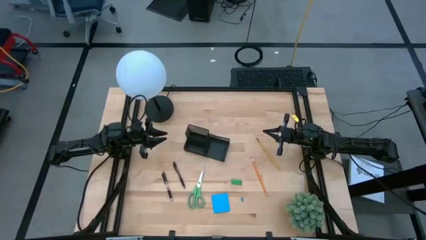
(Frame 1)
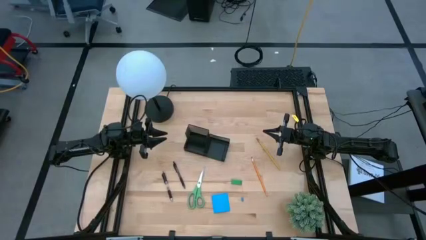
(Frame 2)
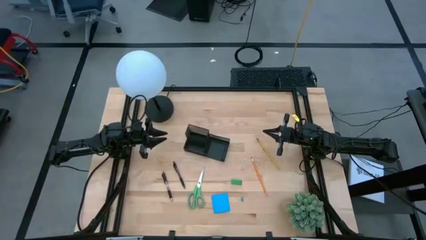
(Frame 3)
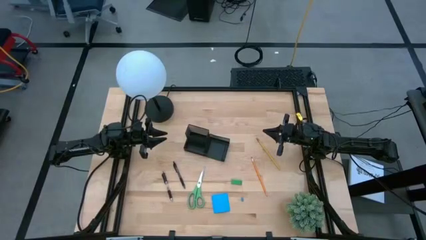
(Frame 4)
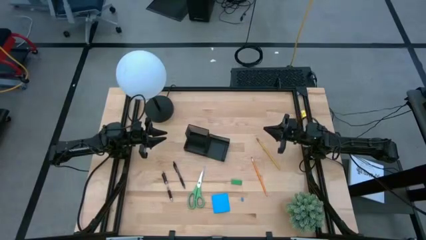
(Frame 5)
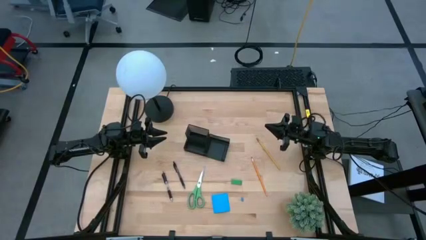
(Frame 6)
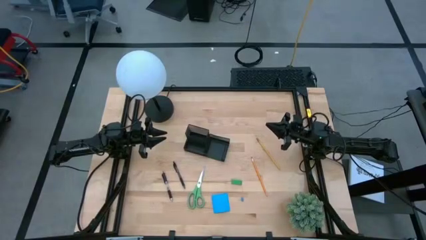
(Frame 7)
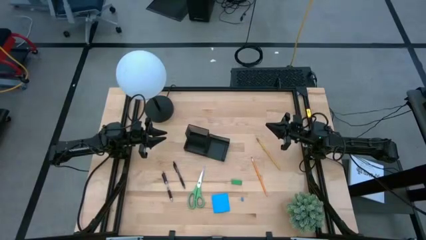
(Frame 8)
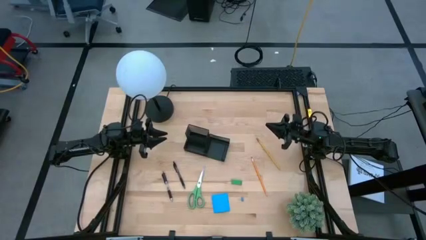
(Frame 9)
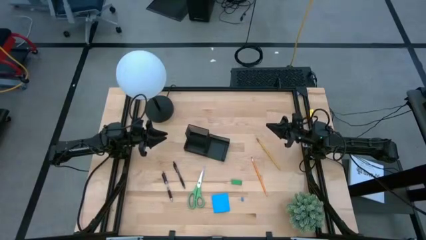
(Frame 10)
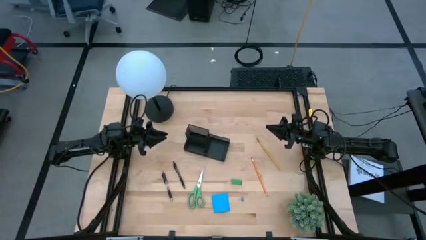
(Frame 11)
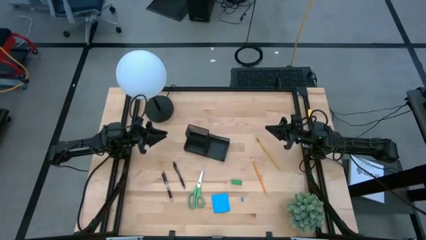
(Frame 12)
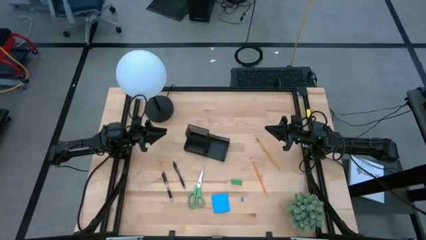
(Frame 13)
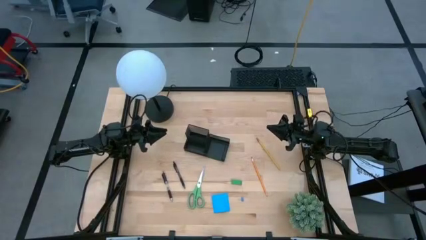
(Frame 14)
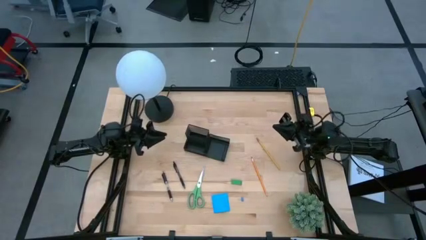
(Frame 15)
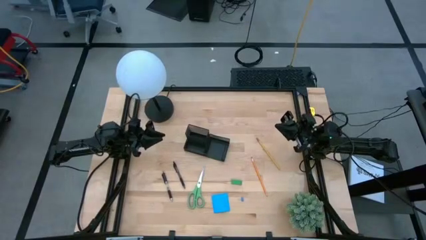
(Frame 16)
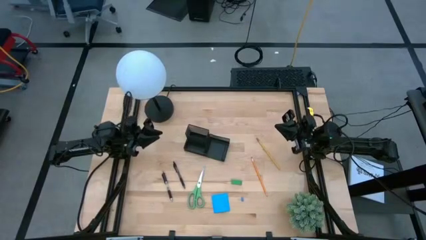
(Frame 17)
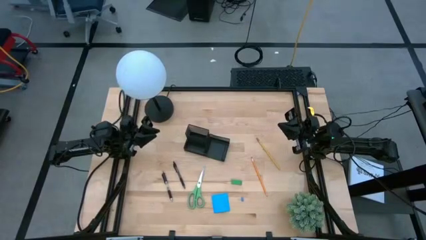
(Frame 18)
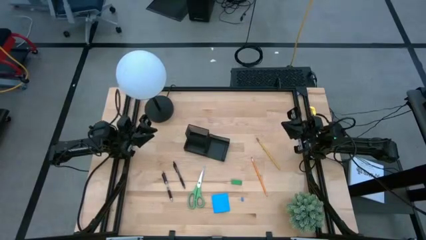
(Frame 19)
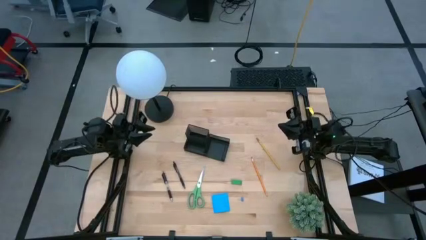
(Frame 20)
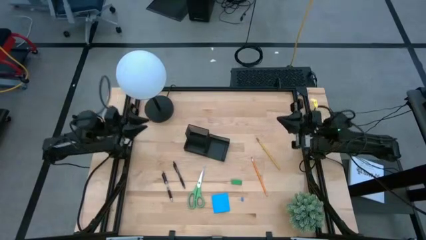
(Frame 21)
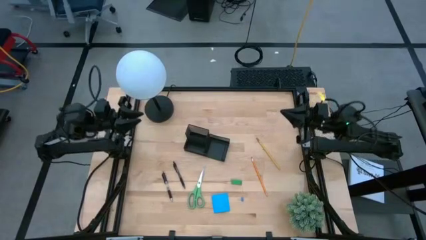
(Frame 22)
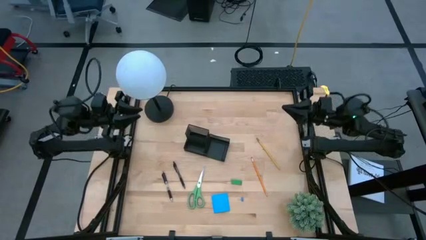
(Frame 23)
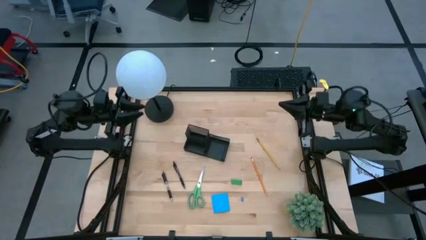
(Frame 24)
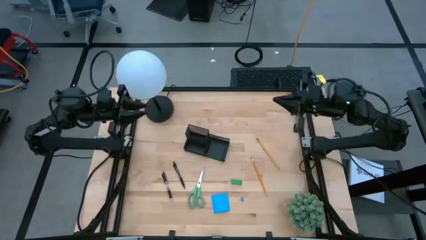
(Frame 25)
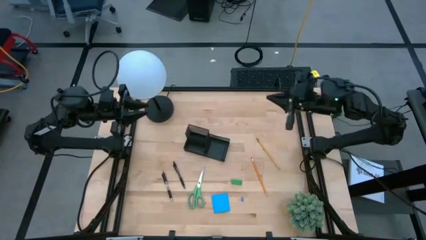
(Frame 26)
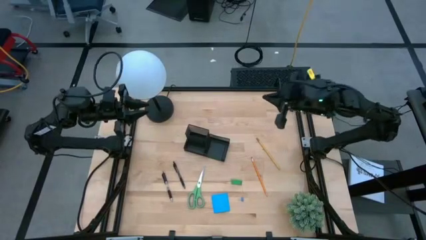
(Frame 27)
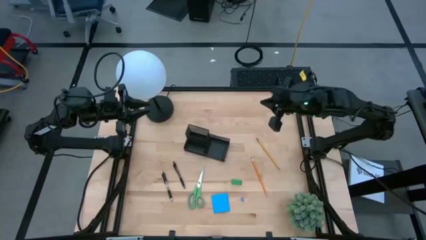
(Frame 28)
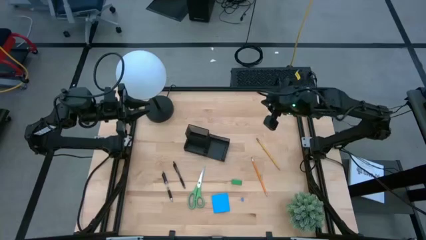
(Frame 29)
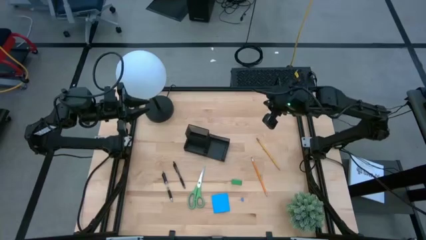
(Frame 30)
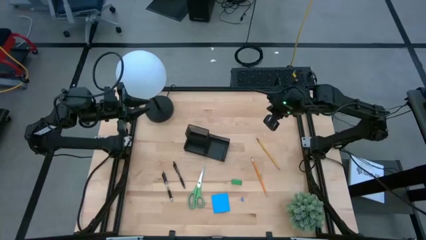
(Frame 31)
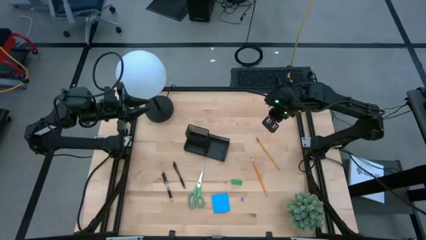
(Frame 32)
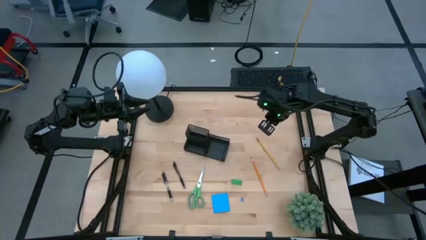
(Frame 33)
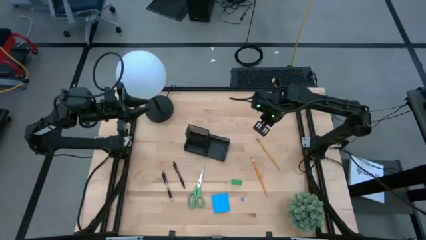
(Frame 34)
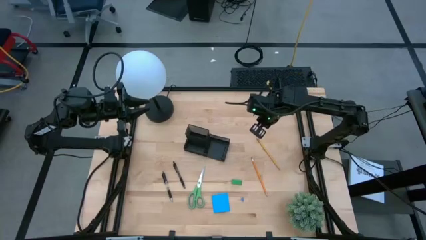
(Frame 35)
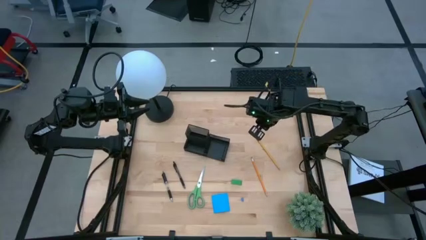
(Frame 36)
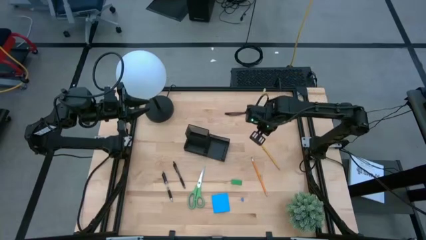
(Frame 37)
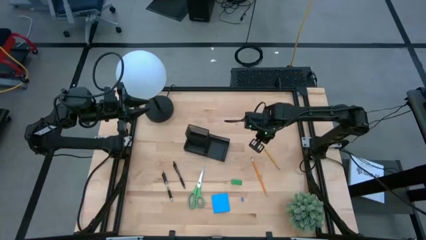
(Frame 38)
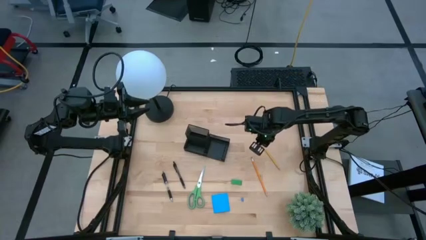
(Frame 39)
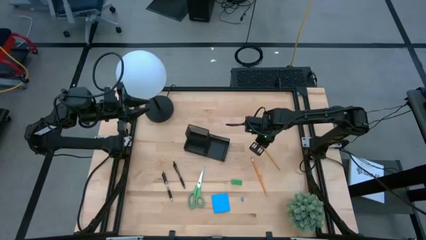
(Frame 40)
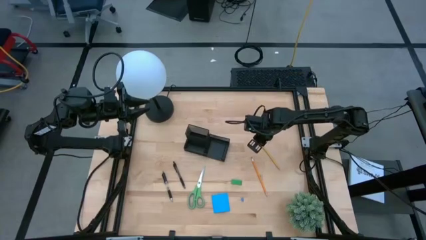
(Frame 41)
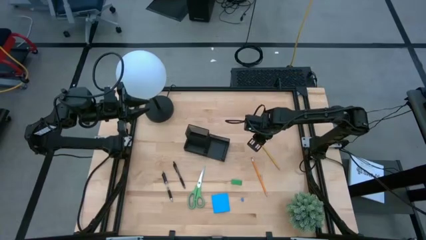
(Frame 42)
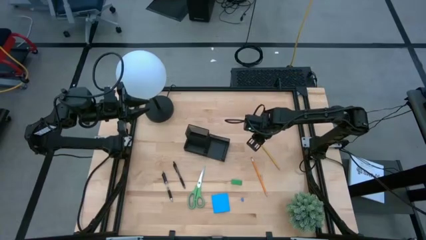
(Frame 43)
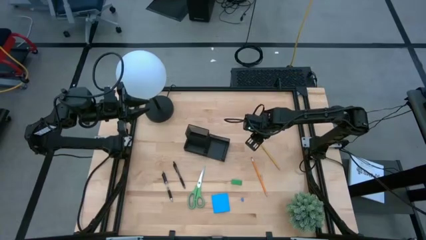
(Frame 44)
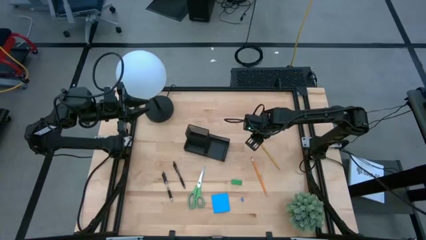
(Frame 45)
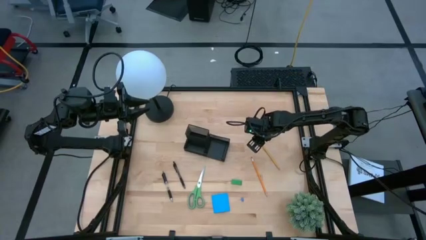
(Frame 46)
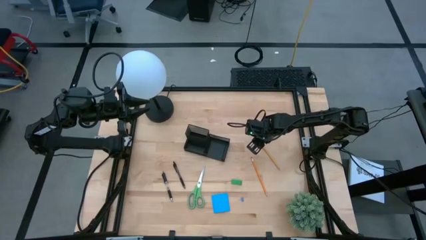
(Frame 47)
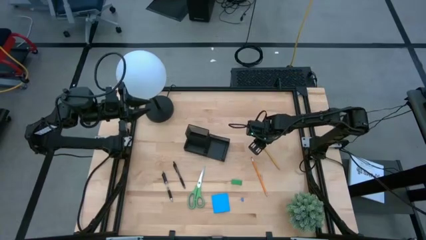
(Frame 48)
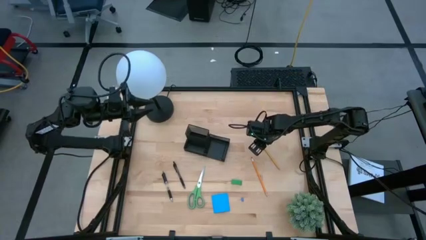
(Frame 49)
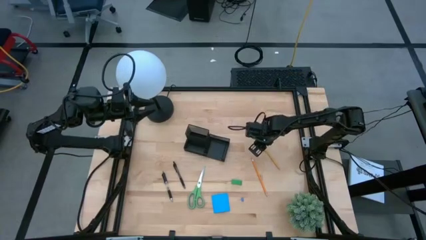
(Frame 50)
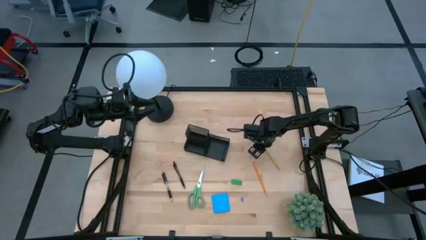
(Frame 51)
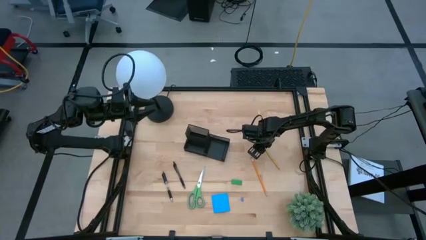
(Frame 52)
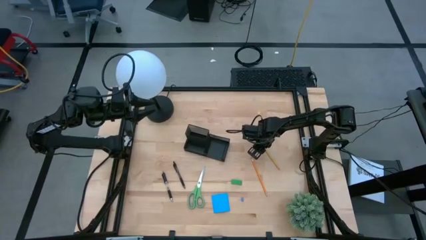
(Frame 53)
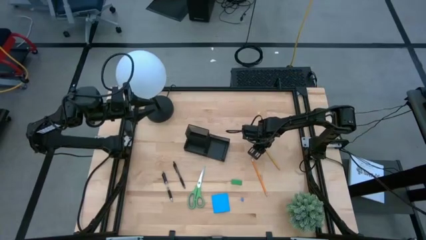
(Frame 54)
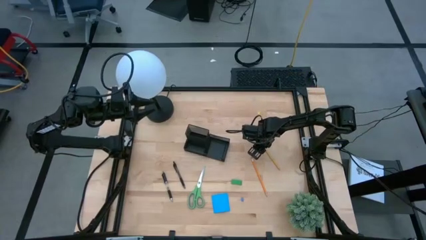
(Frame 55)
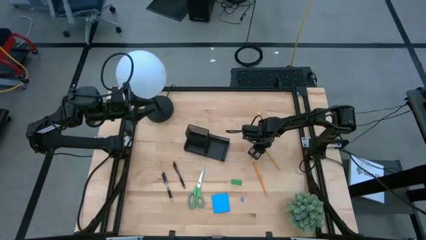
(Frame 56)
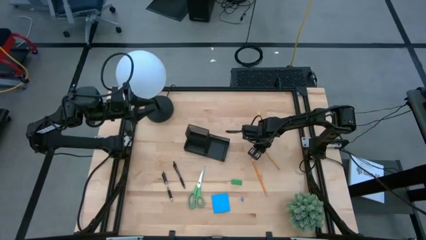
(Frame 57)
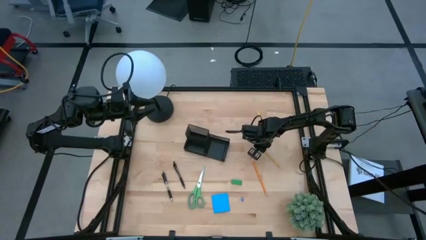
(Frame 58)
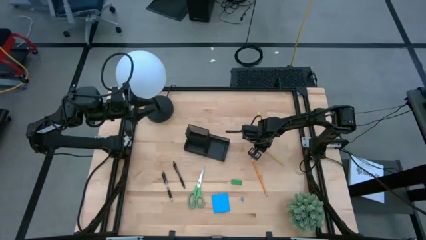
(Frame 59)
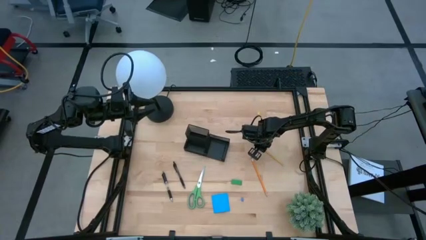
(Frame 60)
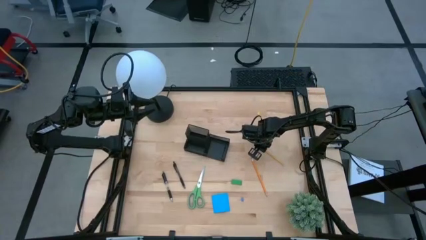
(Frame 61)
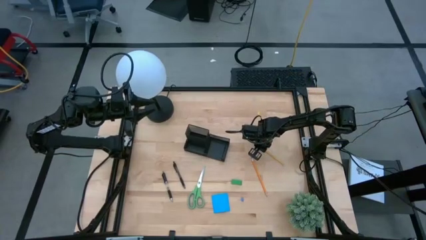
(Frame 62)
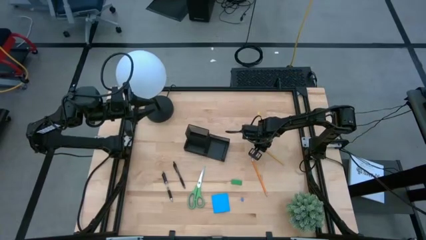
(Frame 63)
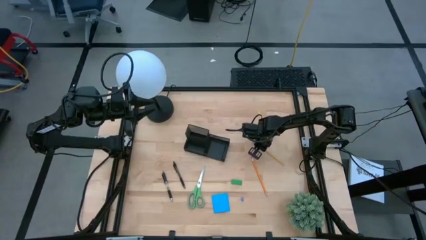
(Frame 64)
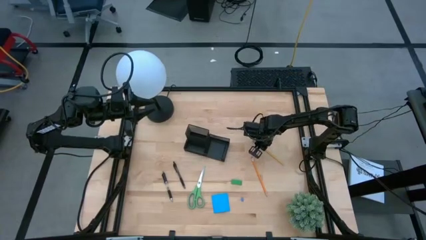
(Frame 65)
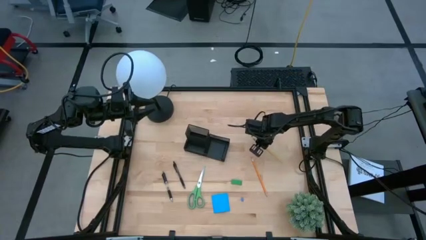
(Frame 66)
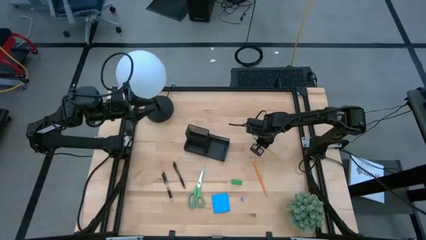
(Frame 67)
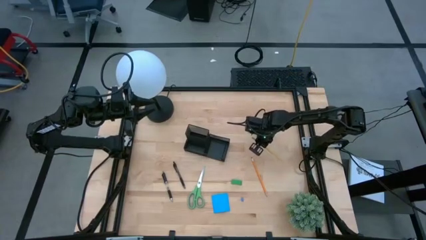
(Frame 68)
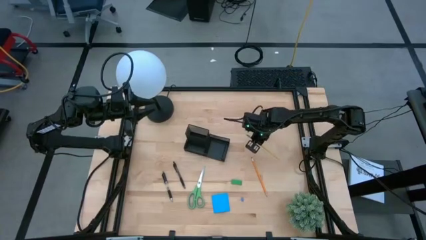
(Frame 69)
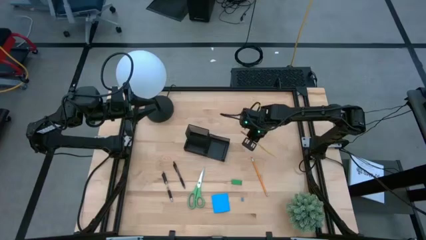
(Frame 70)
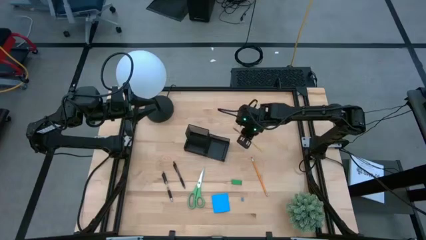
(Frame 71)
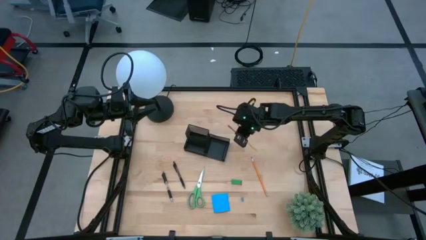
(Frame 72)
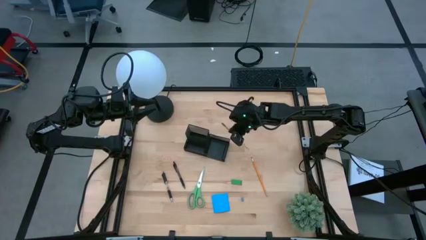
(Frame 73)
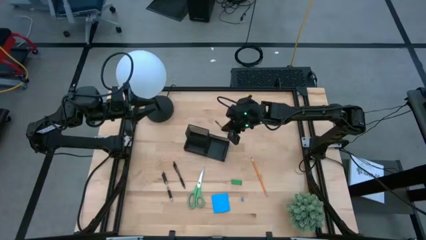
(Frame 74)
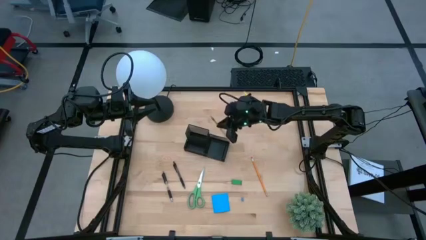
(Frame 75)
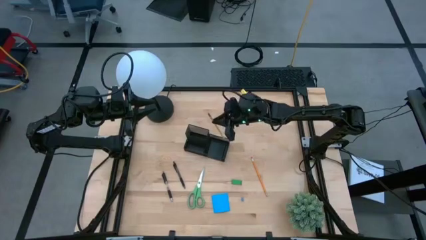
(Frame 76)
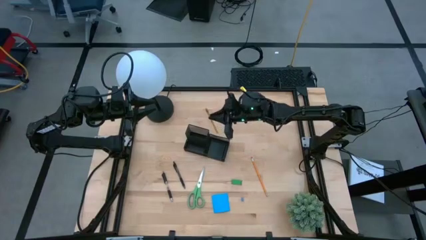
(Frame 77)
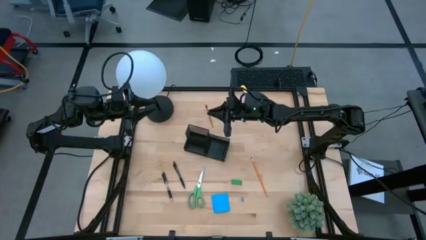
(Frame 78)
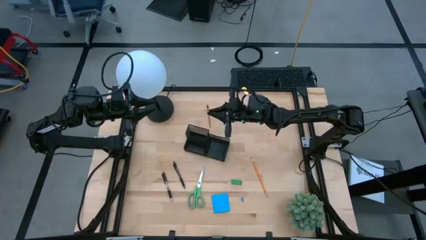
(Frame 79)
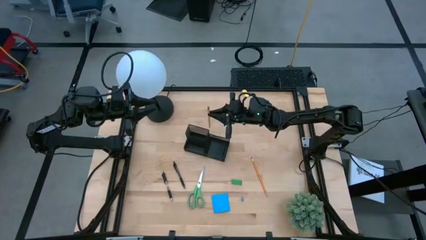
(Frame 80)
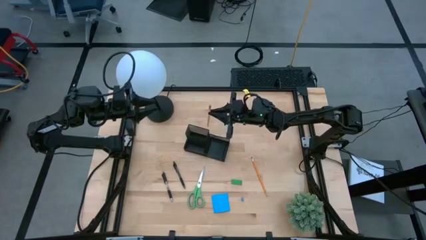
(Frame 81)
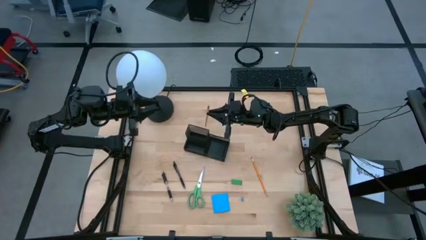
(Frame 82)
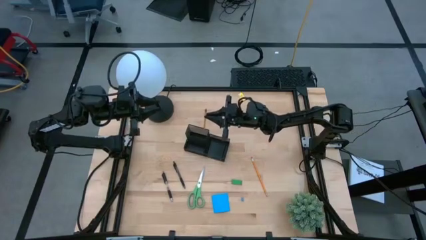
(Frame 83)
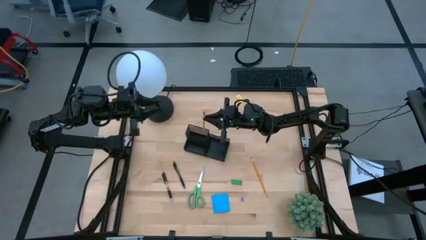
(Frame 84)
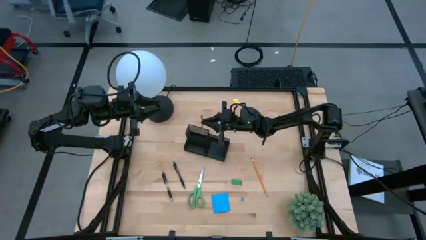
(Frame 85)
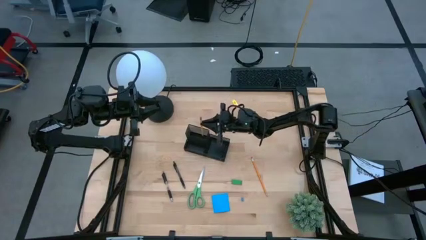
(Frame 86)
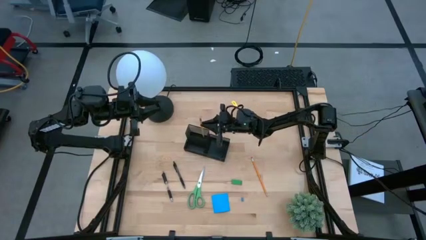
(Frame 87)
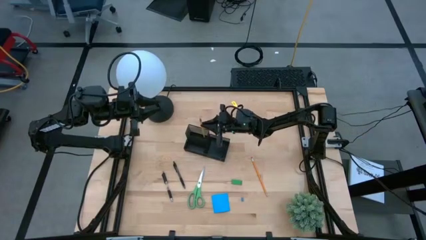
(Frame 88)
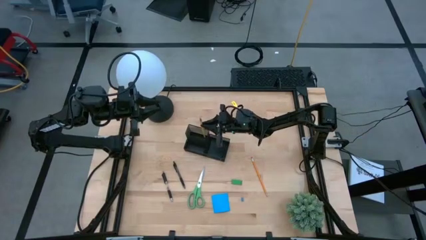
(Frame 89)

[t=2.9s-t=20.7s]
Task: Pick and place office supplies into organizer
Put the yellow pencil into the black desk organizer
